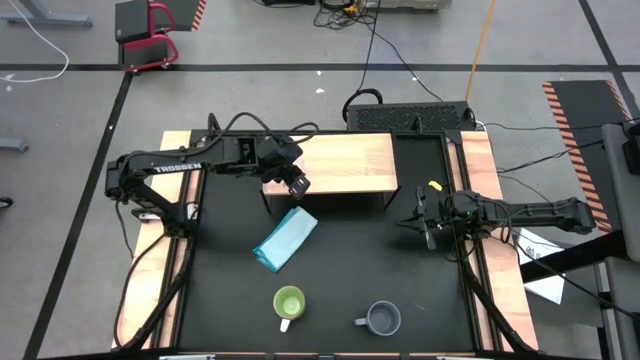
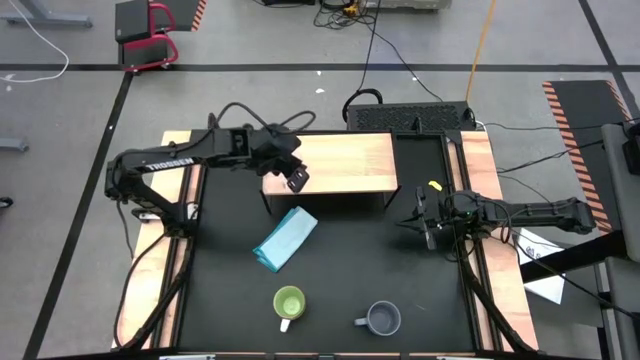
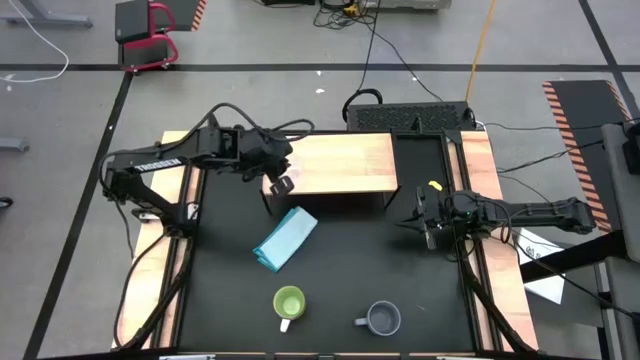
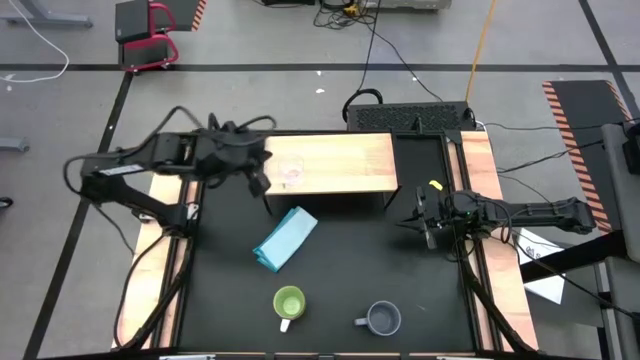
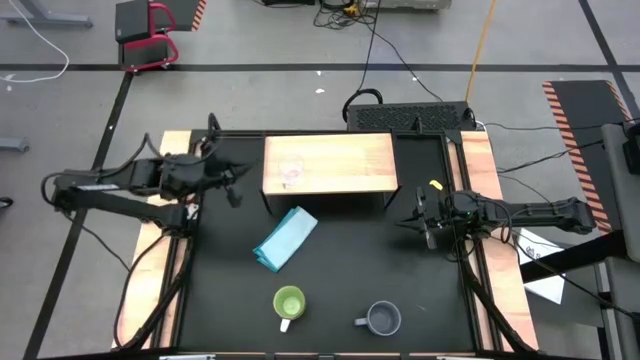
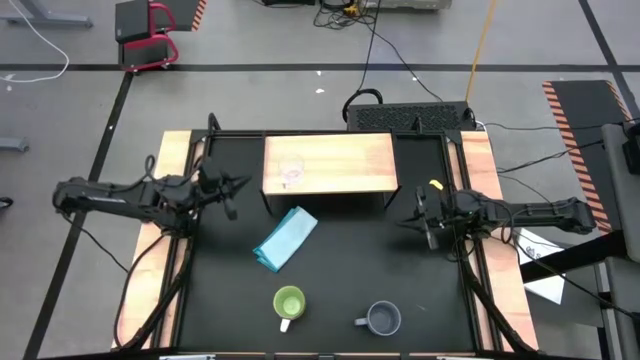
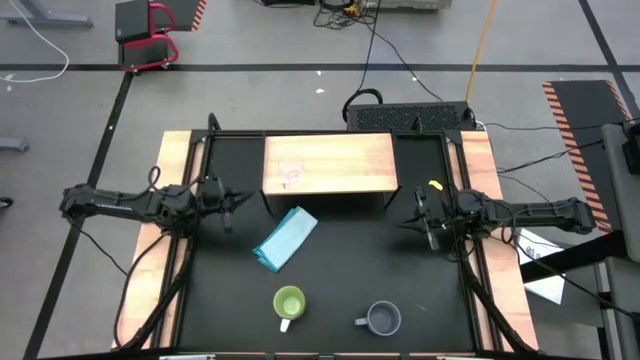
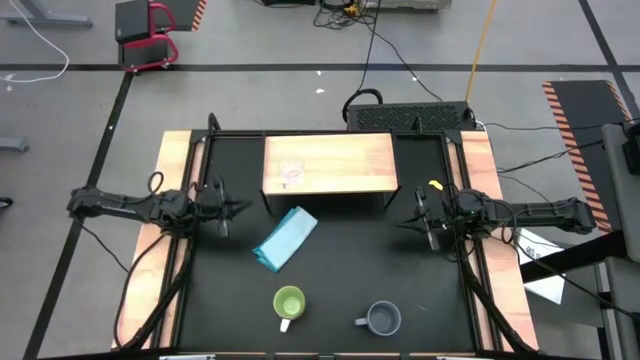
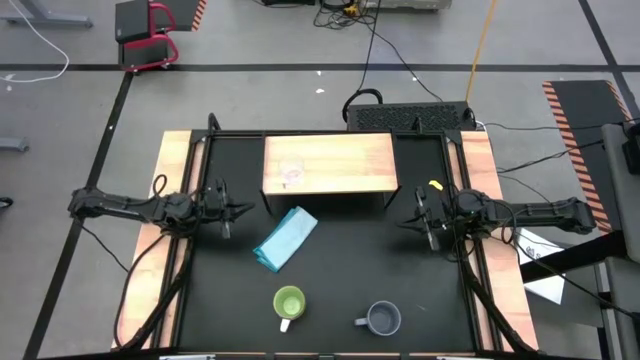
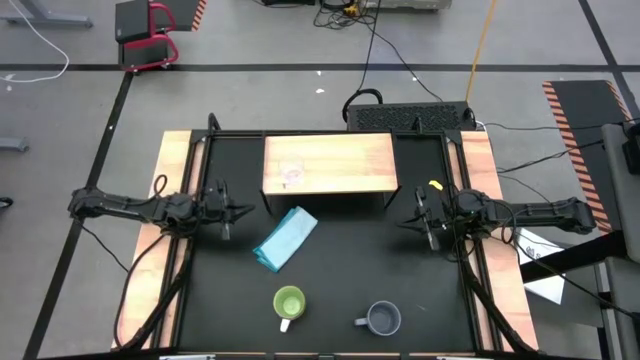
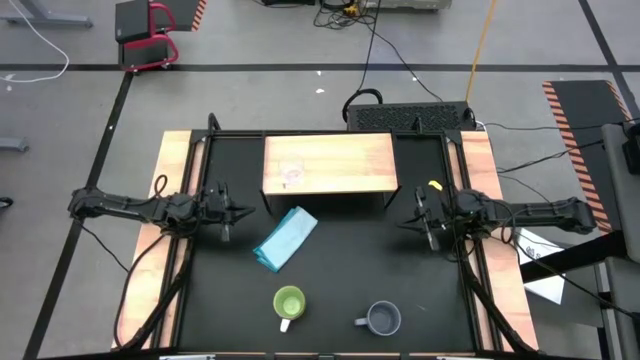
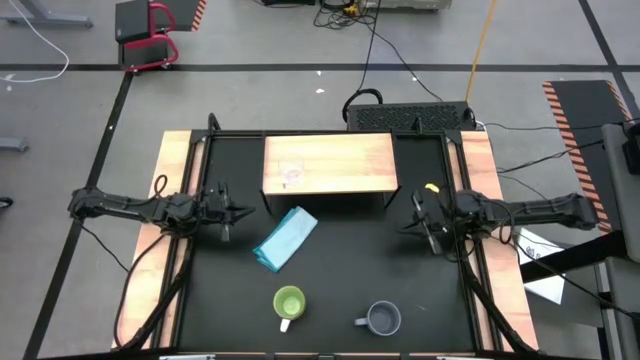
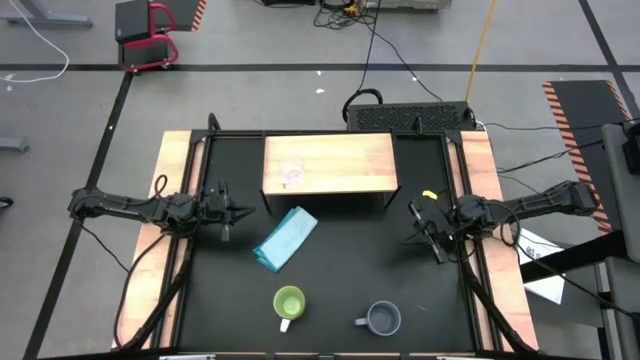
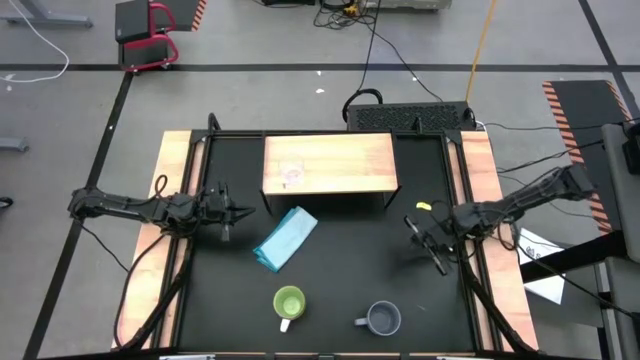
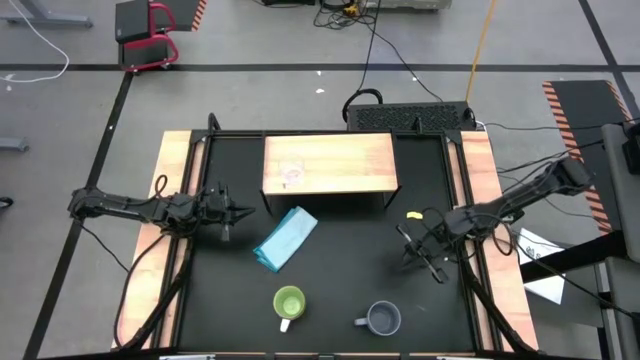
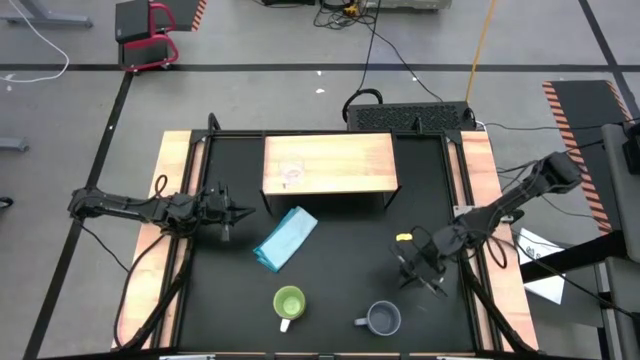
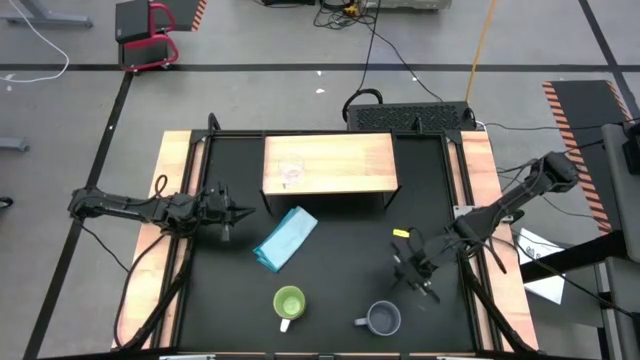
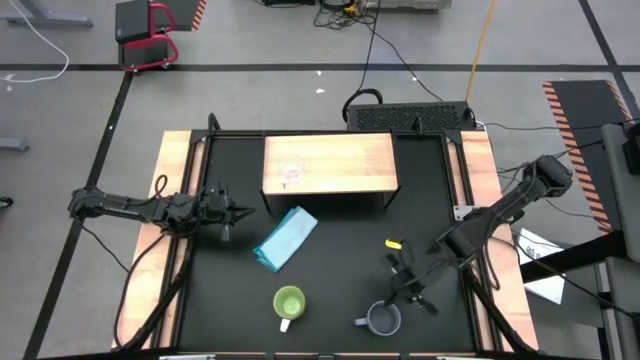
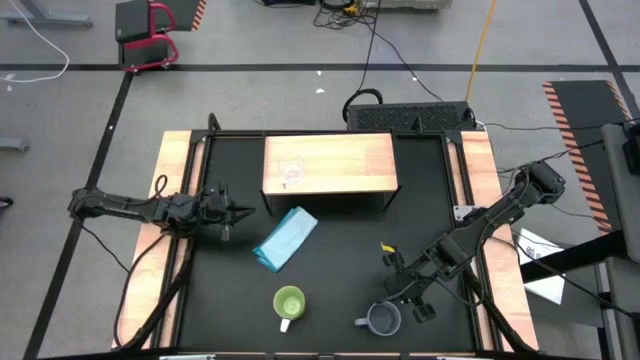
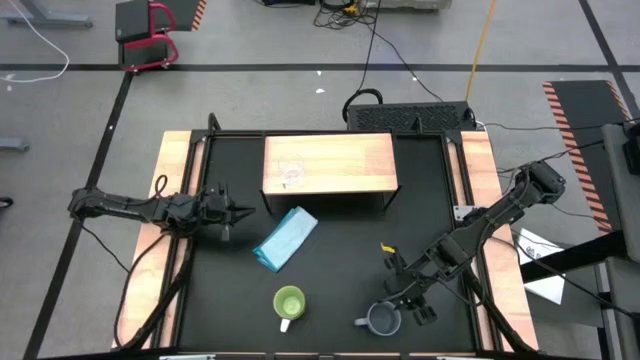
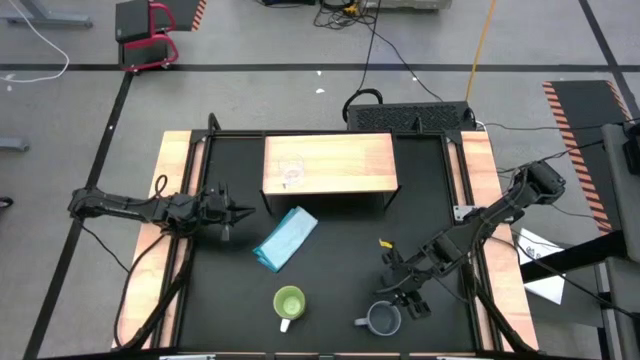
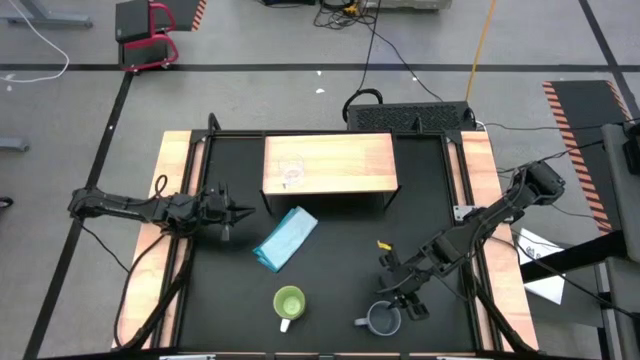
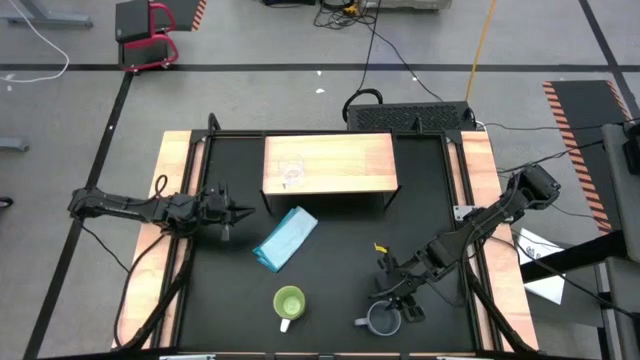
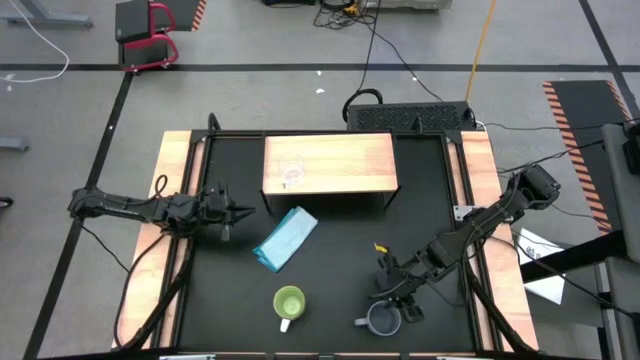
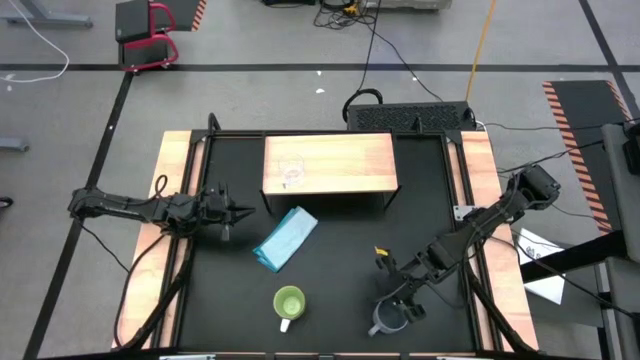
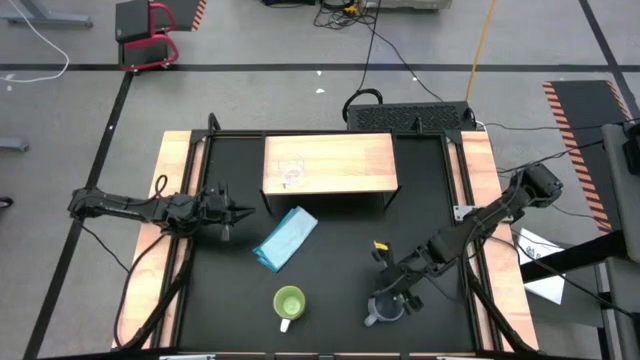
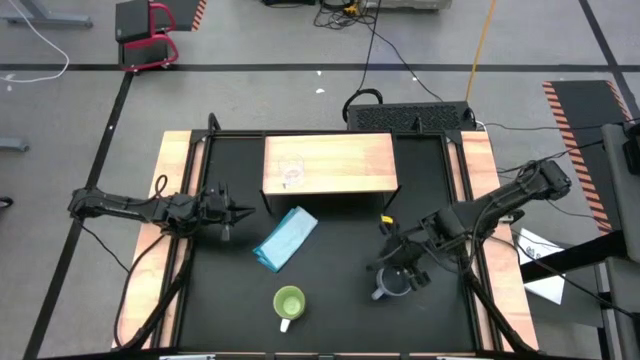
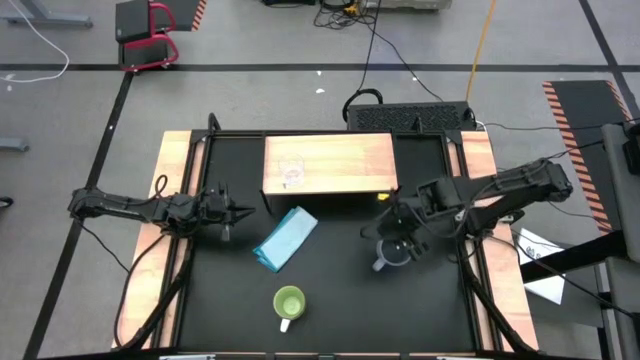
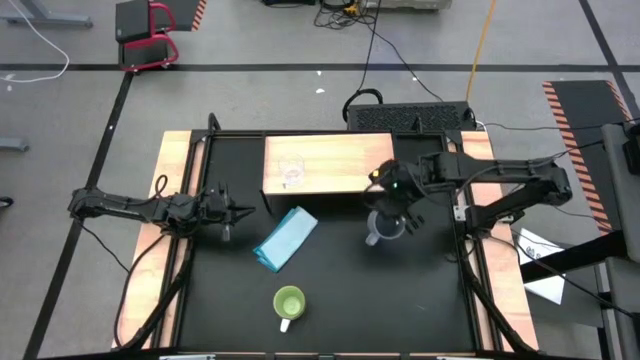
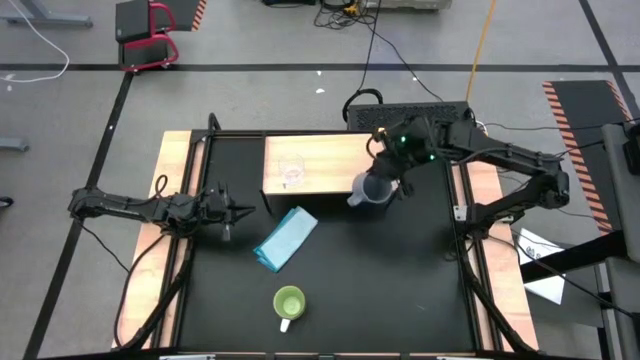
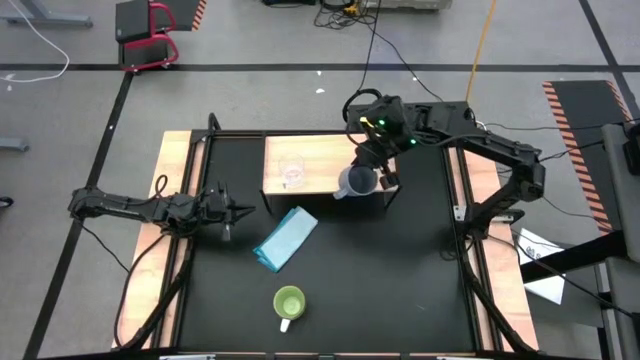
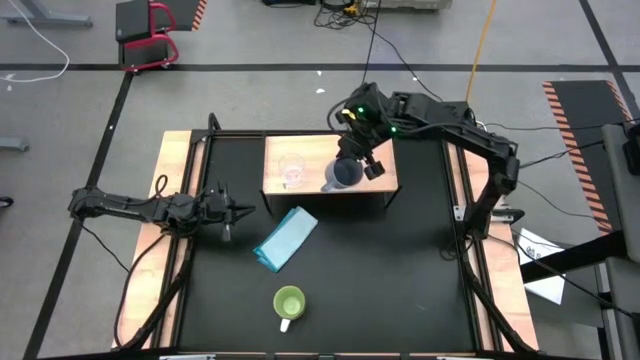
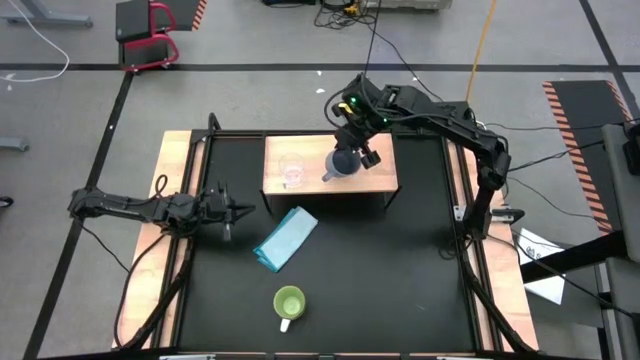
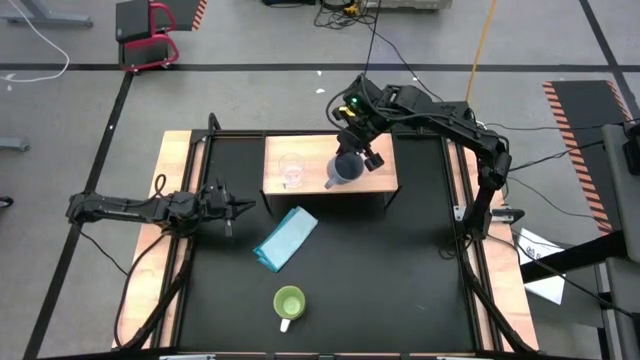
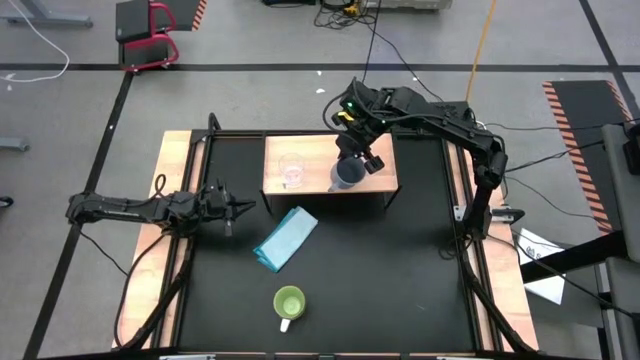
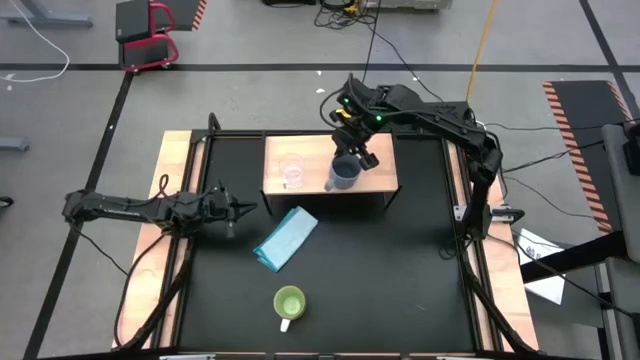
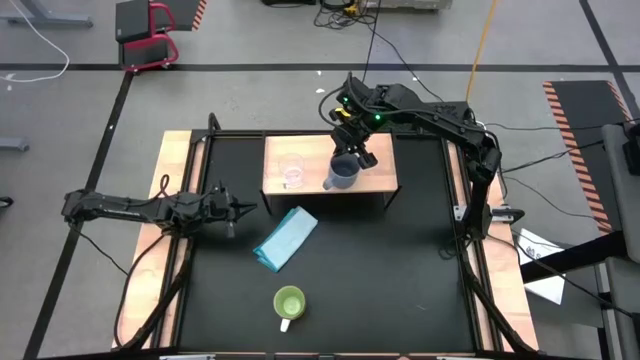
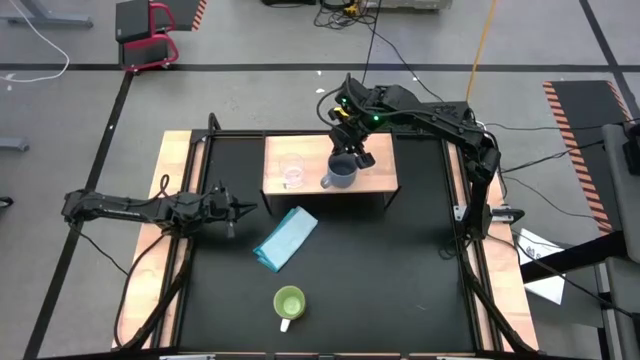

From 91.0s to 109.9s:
Task: Stack small to large cups/mugs on shelf
Put the gray mug on the shelf
